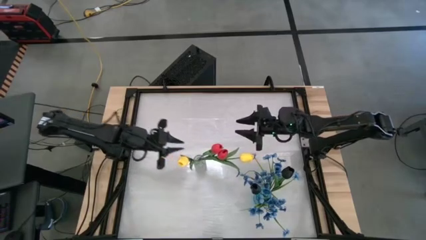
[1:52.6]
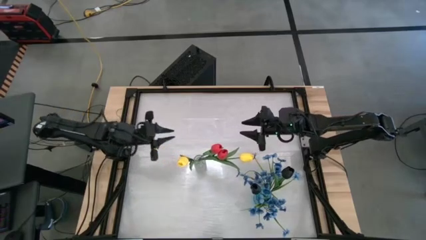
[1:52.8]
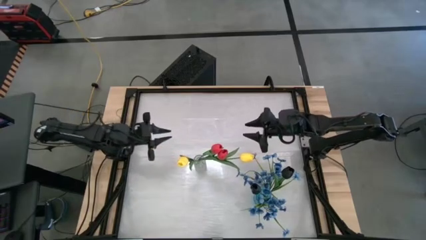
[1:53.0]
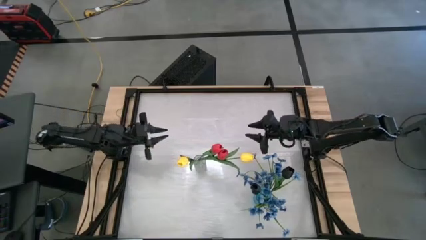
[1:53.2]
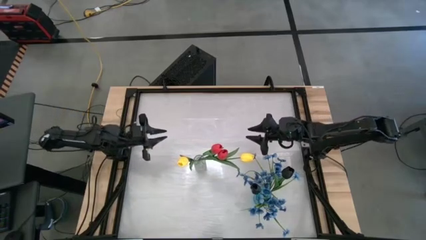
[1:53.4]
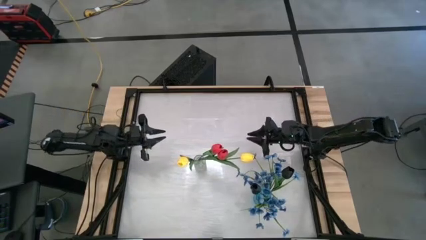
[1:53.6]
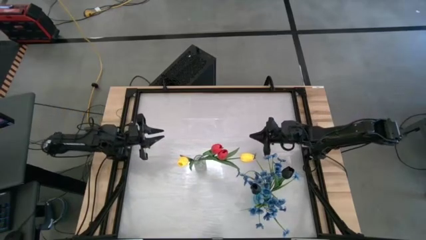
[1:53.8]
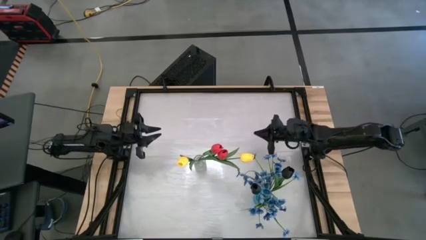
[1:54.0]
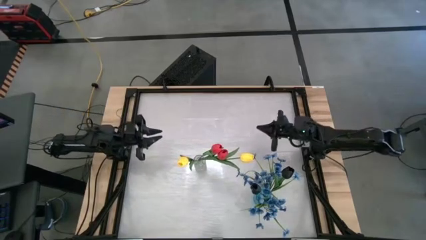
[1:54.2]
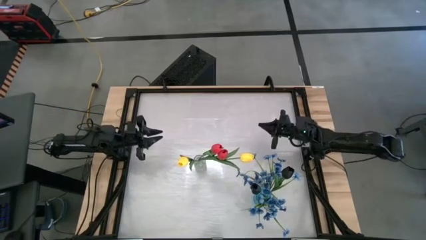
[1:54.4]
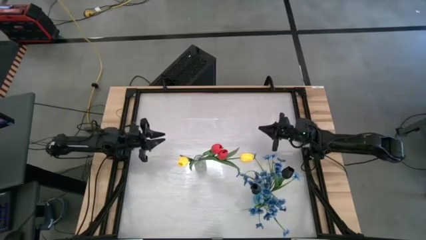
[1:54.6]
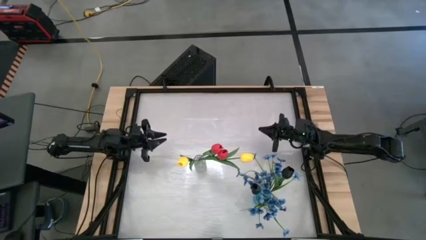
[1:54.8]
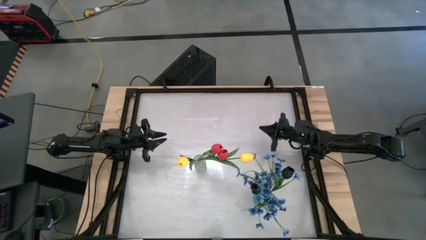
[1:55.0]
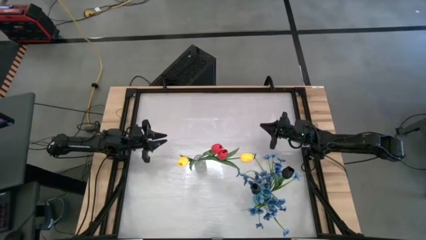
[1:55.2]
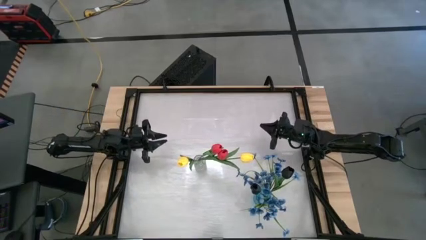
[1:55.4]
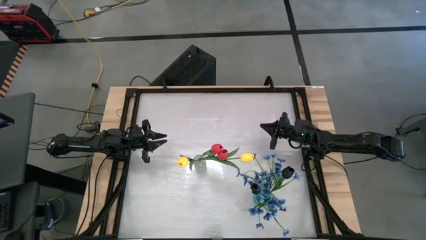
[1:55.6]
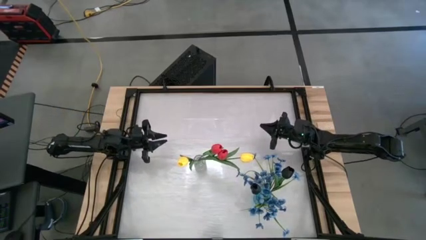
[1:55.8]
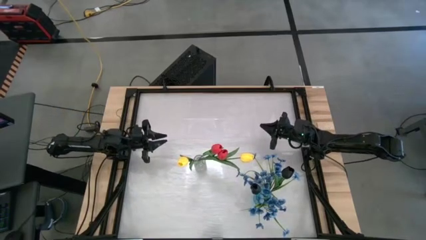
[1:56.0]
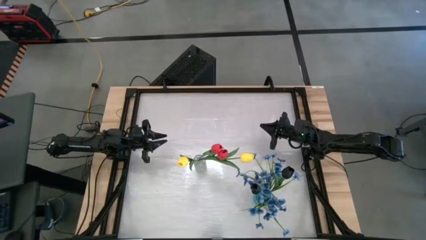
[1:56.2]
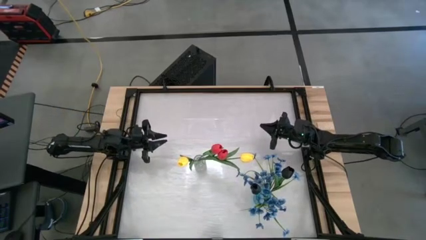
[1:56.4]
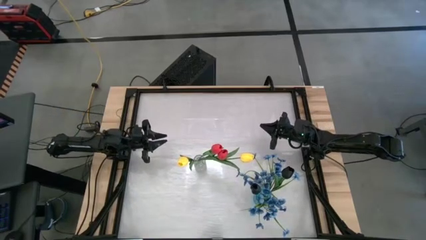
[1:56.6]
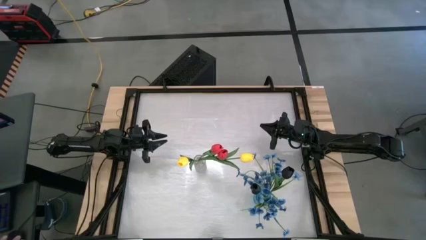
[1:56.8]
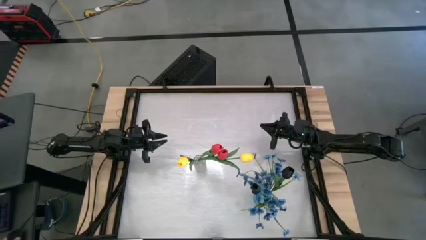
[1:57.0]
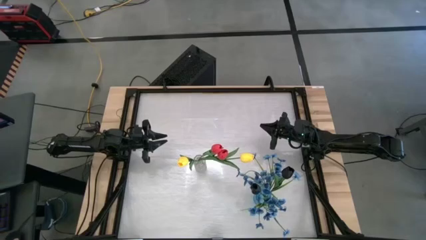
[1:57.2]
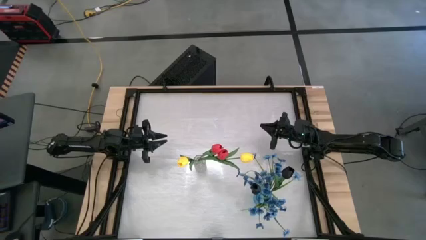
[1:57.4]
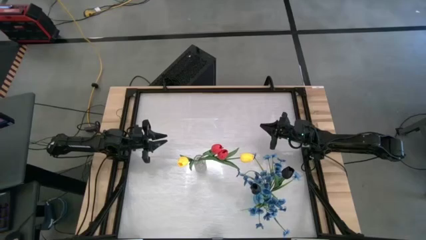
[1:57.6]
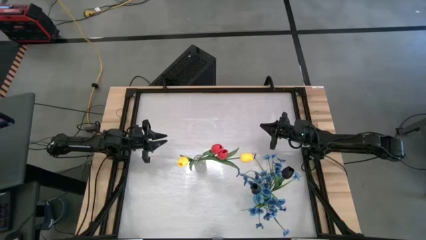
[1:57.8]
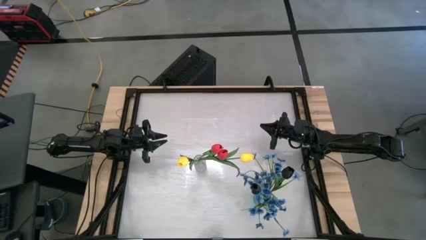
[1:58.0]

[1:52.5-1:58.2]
Task: Sort flowers into vase by color
Return to home position

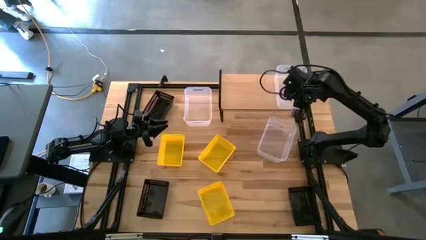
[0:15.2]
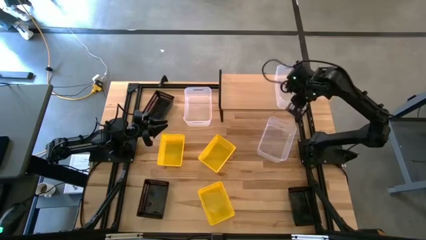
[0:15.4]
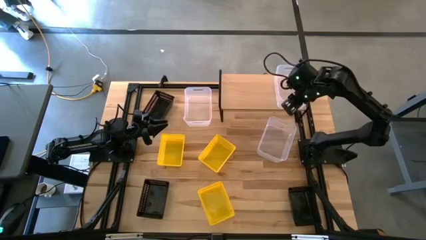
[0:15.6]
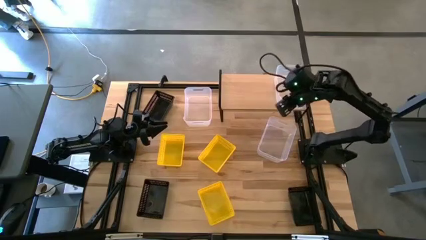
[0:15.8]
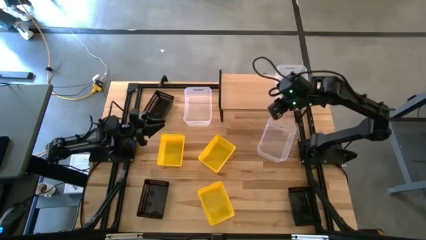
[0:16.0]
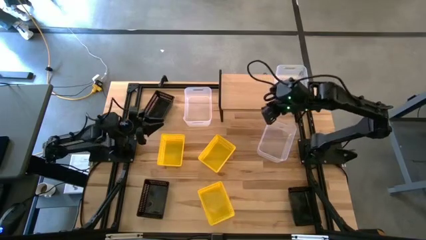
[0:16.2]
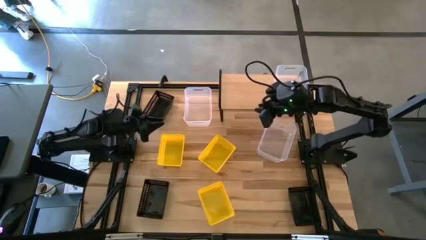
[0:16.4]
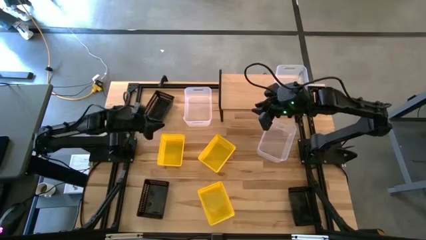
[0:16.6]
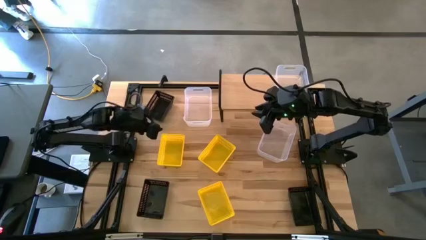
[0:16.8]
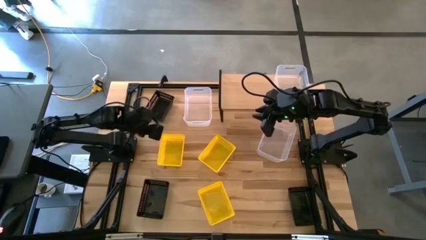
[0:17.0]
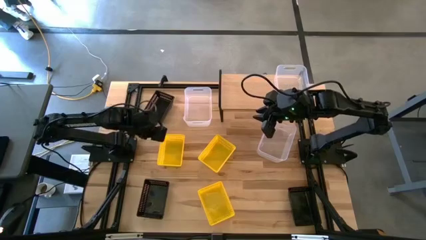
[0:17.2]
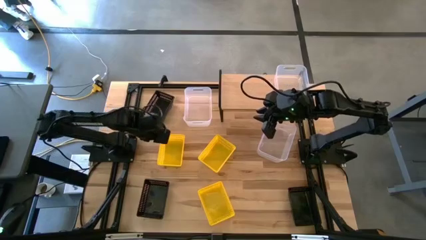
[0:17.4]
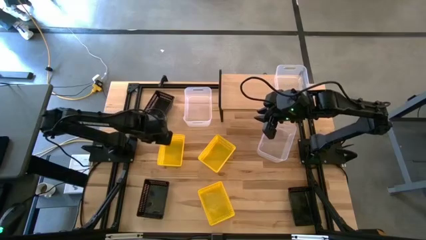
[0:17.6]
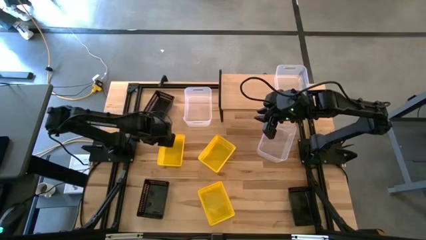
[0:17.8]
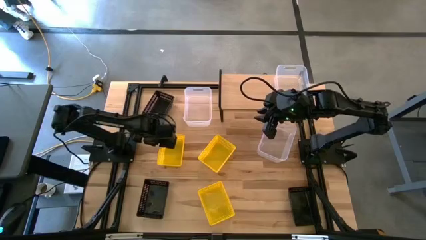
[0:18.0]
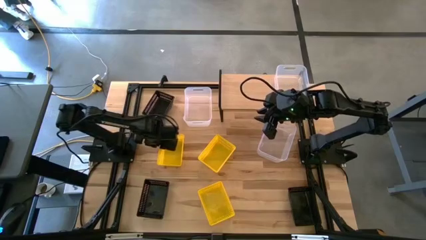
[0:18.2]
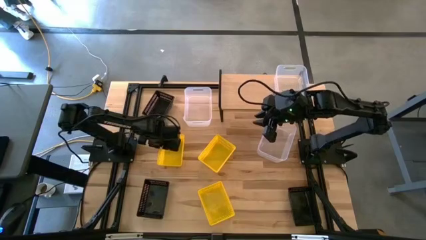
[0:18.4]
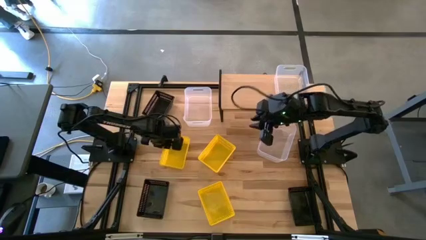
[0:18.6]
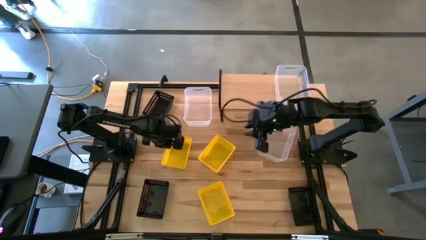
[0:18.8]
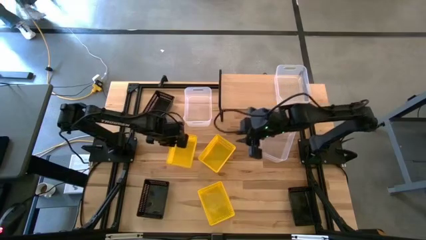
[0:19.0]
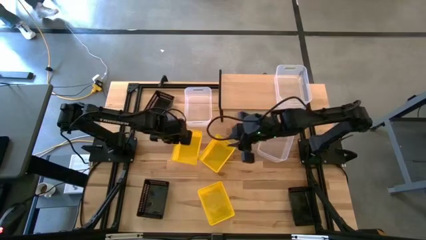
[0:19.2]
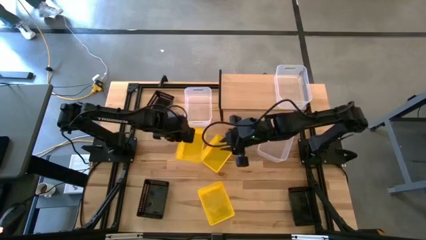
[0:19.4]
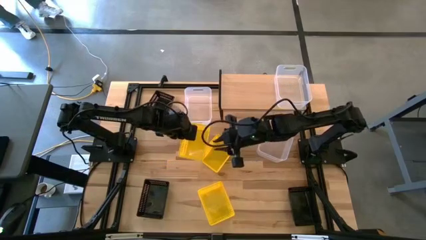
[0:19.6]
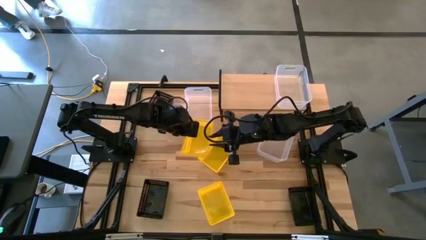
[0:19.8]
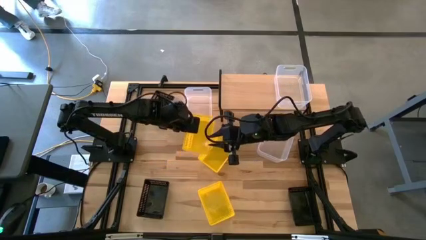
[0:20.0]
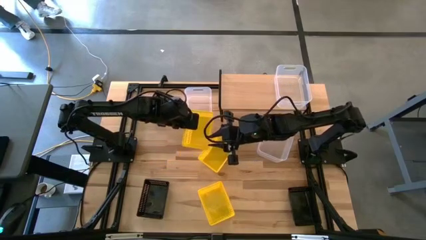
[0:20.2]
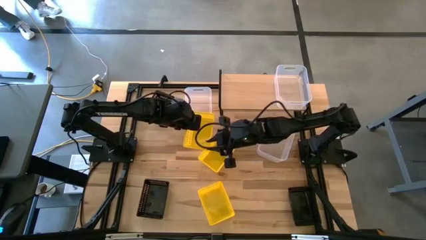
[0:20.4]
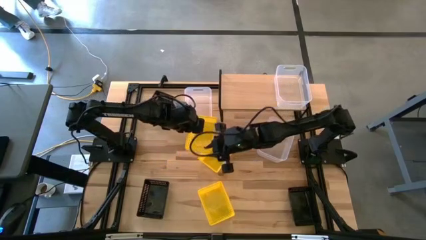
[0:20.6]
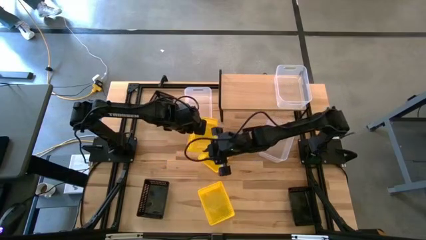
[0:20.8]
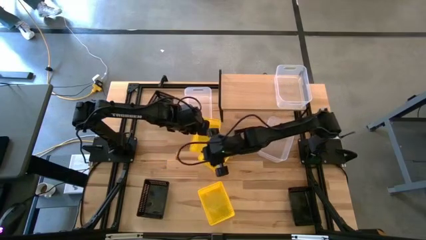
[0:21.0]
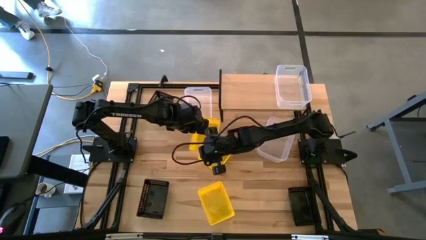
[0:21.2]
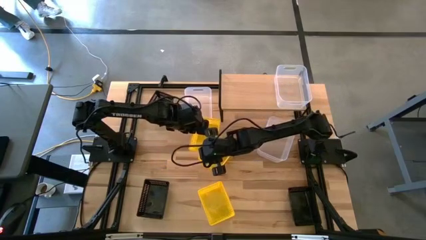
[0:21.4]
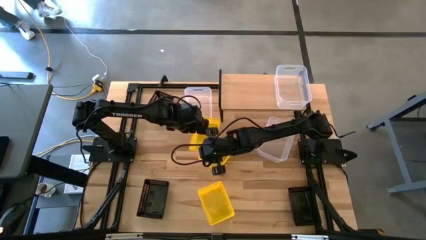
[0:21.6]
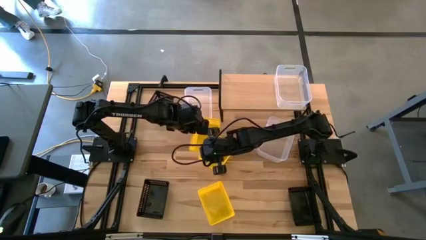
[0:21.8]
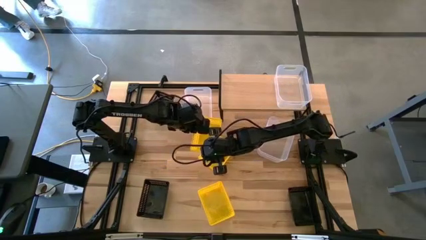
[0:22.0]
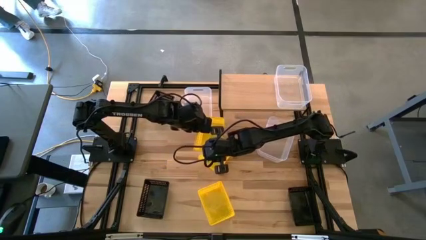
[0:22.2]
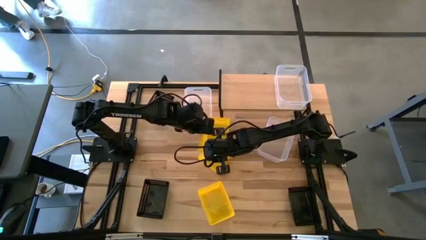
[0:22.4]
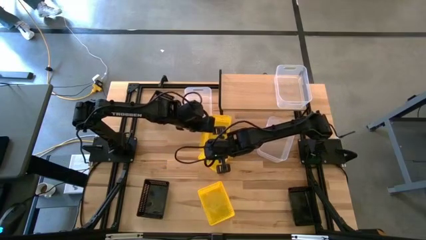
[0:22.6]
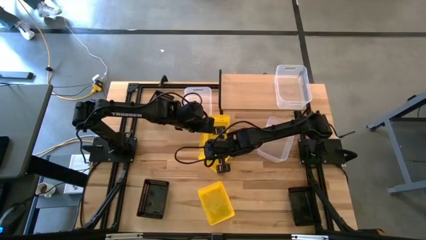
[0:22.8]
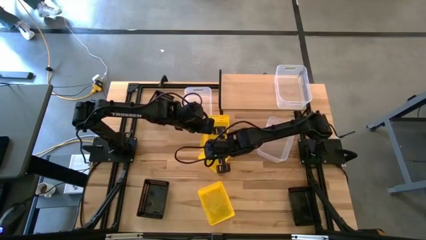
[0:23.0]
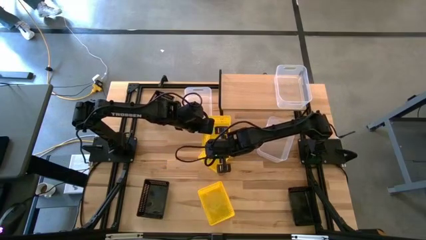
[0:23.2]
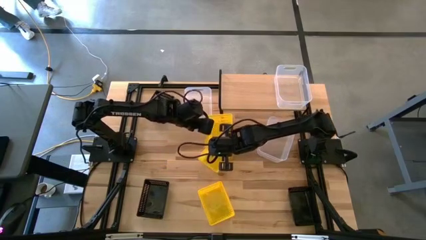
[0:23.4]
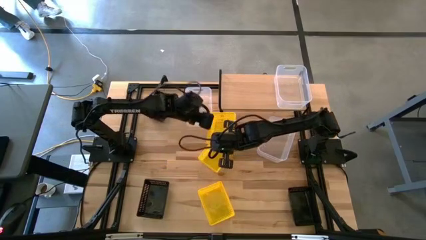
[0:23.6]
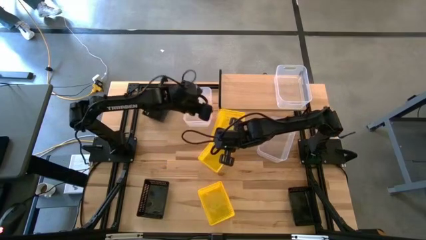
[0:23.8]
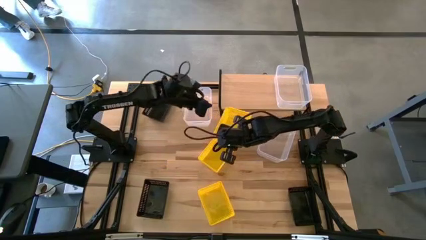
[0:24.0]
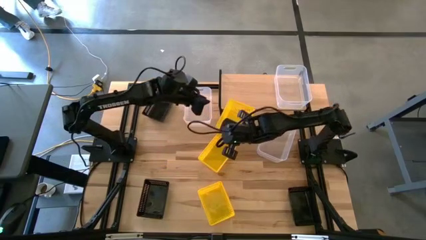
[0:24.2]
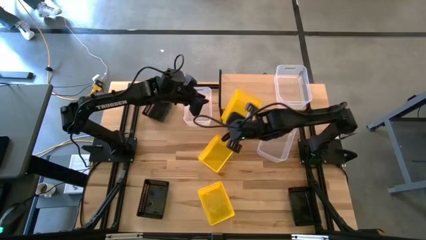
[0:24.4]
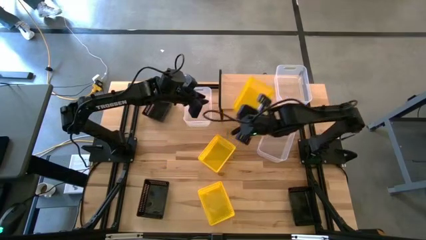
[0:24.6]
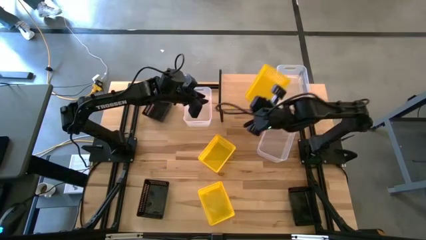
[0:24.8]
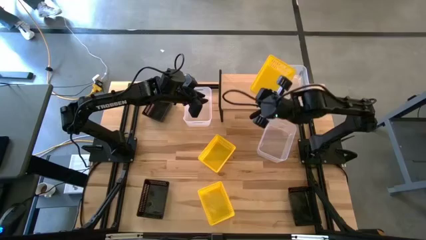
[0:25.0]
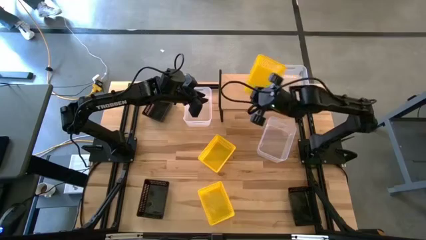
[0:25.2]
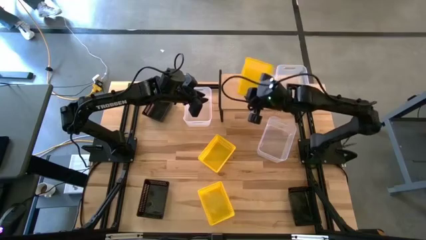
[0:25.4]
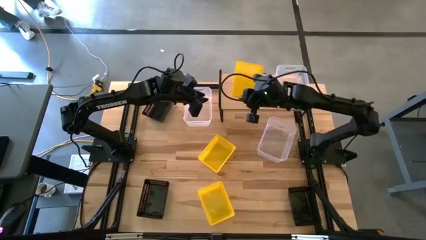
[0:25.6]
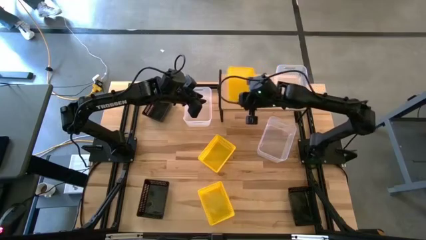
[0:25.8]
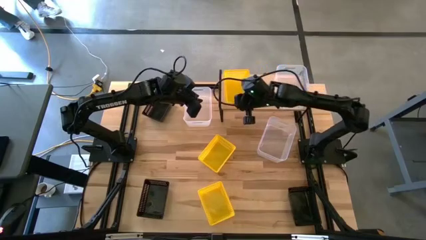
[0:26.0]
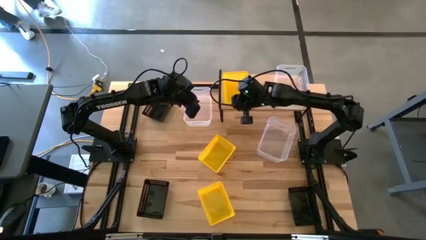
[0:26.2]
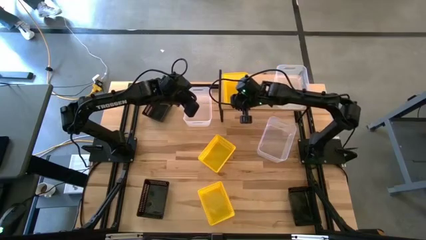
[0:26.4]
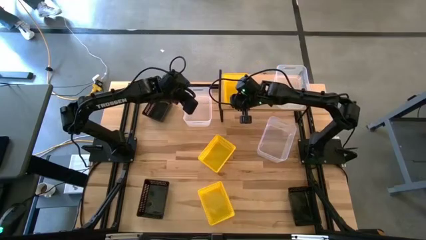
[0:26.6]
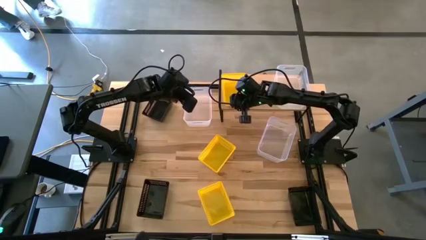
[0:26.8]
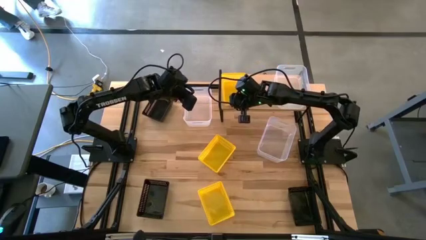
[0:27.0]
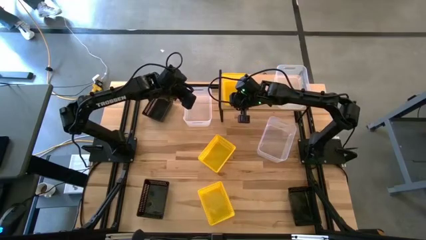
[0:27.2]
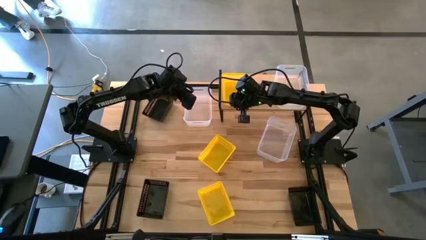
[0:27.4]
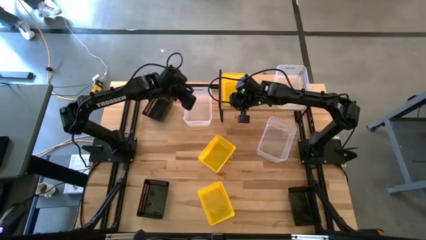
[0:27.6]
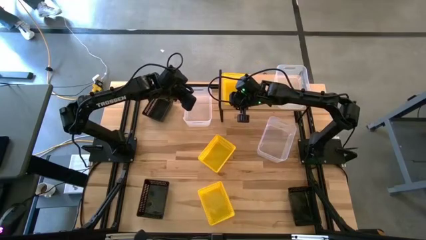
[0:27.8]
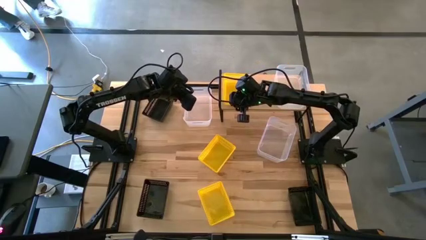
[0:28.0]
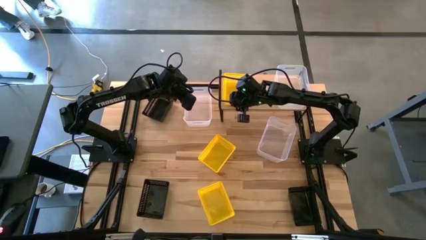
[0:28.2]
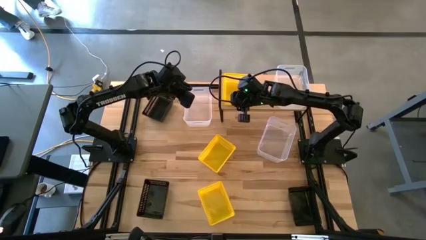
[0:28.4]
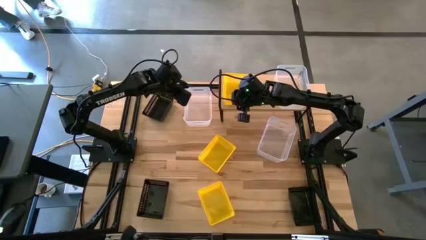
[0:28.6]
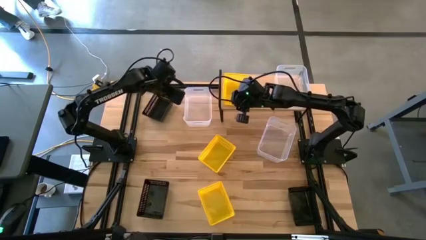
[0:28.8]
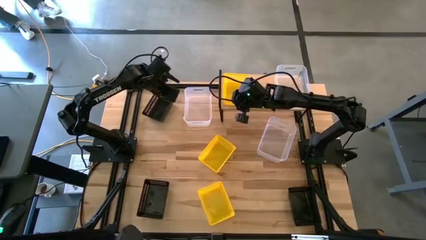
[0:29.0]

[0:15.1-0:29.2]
Task: Stack baskets on shelf by color
Put the top left yellow bin on the shelf
